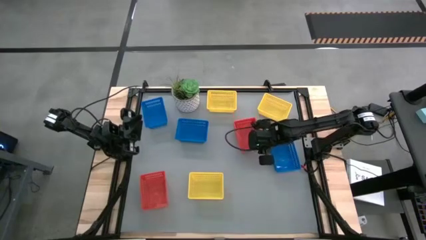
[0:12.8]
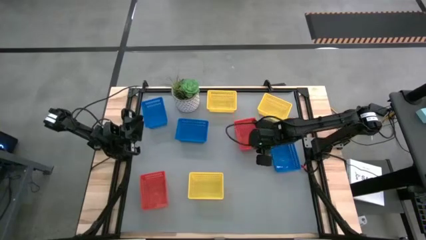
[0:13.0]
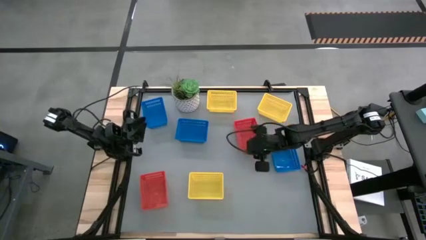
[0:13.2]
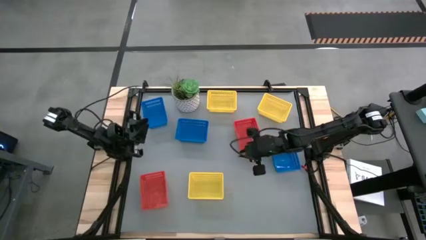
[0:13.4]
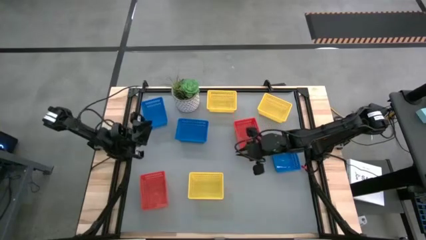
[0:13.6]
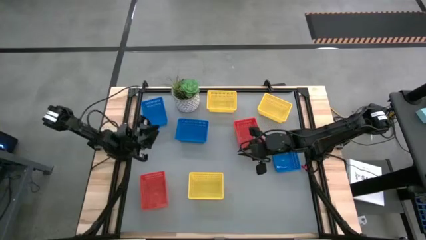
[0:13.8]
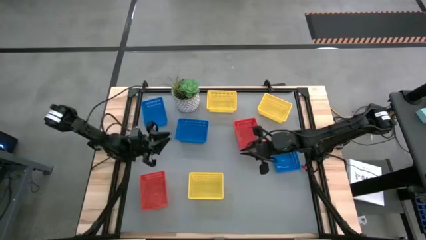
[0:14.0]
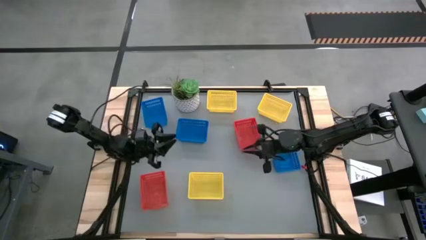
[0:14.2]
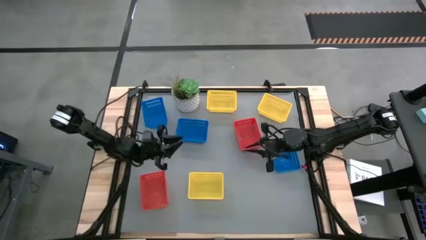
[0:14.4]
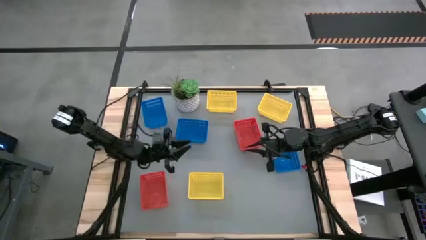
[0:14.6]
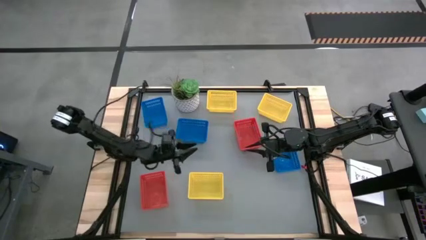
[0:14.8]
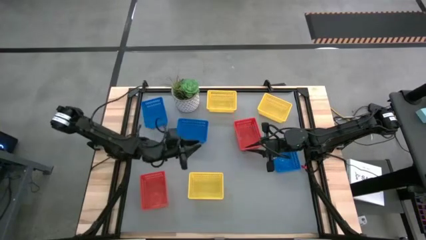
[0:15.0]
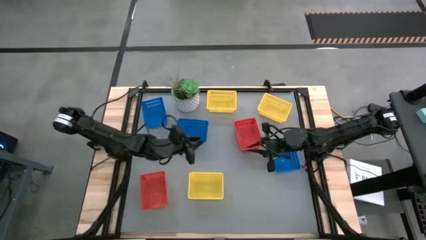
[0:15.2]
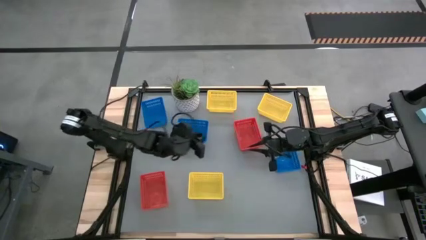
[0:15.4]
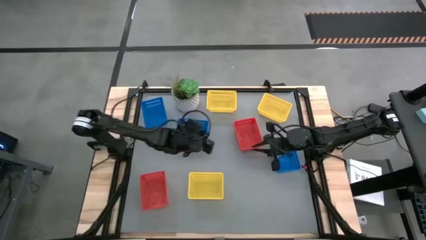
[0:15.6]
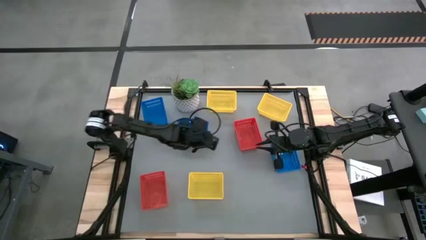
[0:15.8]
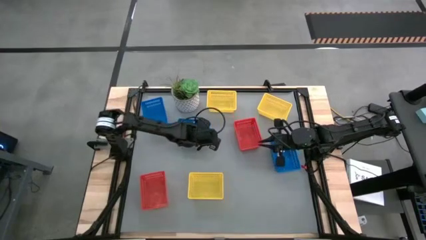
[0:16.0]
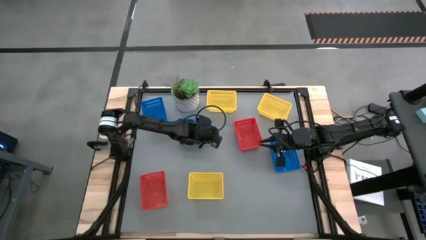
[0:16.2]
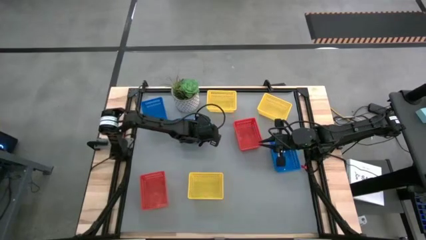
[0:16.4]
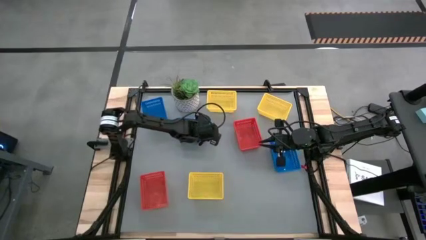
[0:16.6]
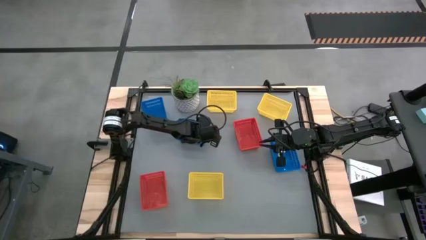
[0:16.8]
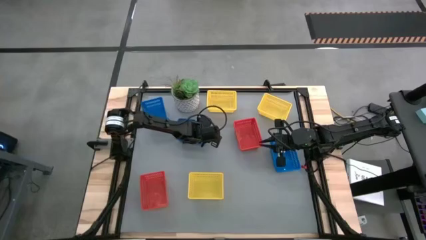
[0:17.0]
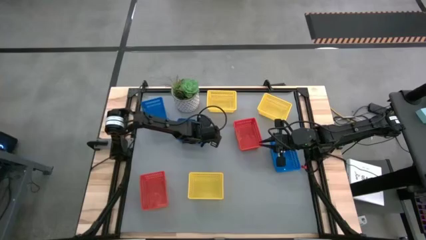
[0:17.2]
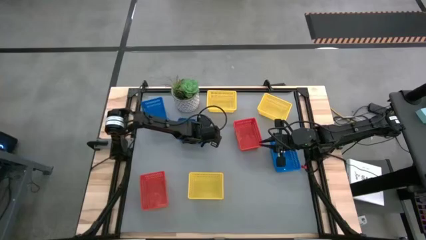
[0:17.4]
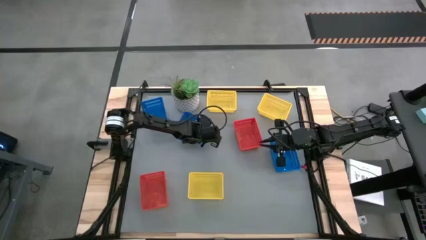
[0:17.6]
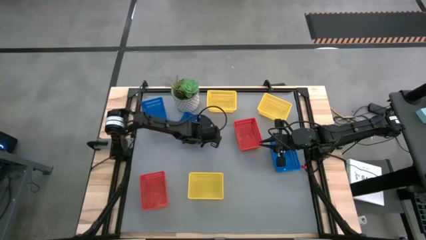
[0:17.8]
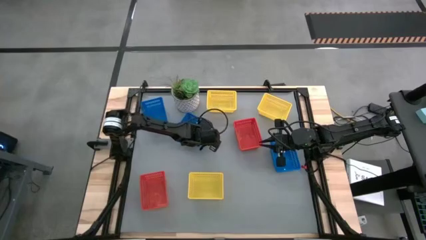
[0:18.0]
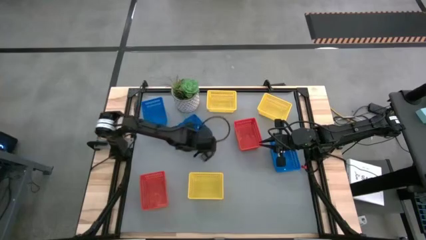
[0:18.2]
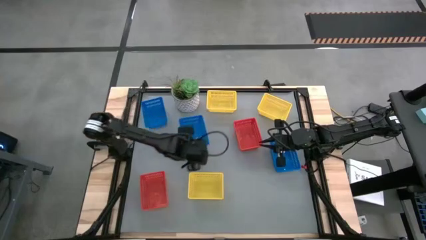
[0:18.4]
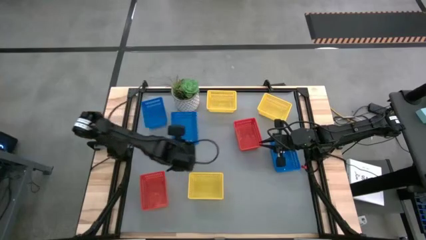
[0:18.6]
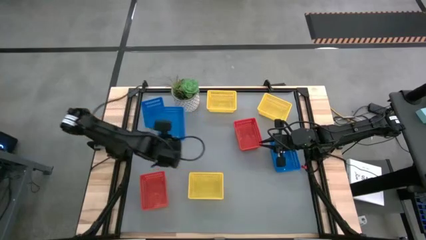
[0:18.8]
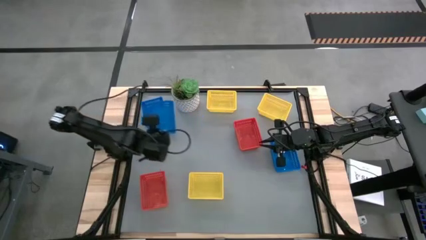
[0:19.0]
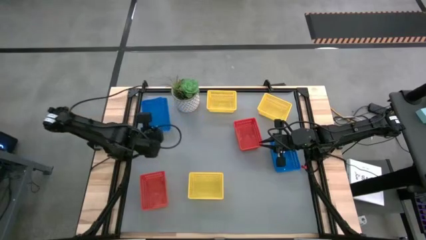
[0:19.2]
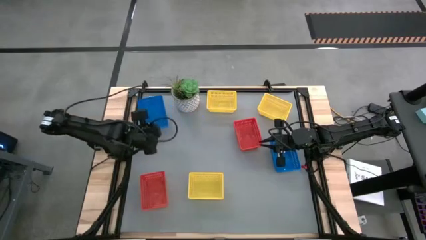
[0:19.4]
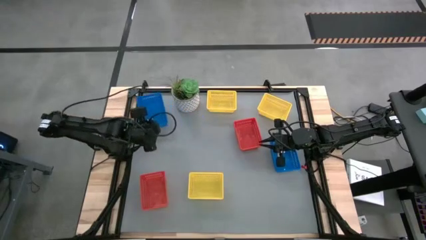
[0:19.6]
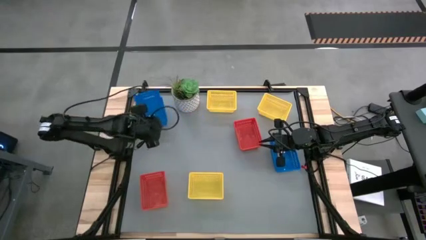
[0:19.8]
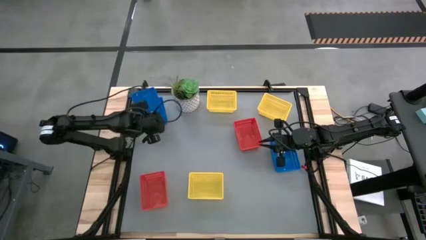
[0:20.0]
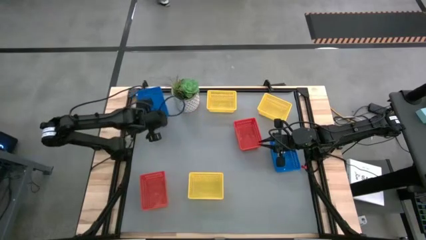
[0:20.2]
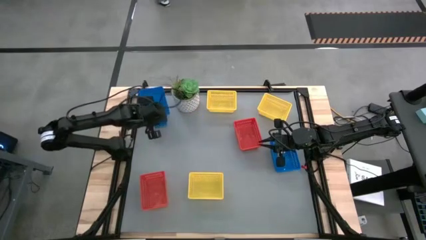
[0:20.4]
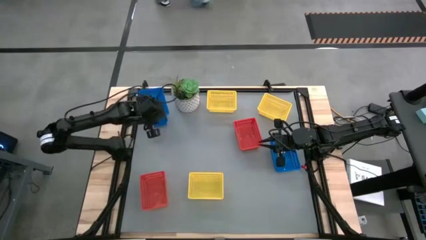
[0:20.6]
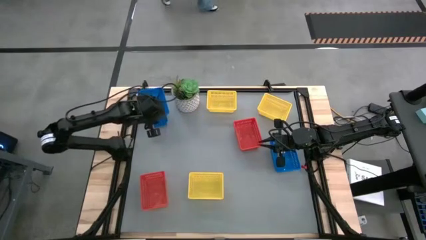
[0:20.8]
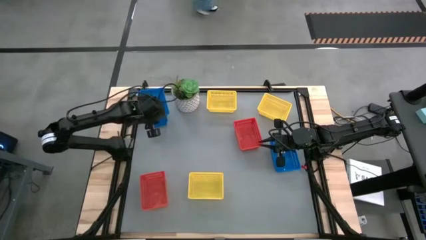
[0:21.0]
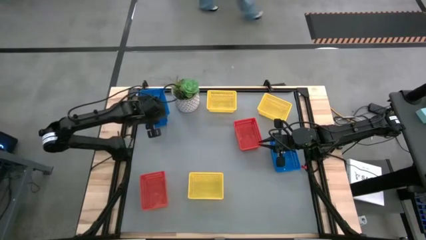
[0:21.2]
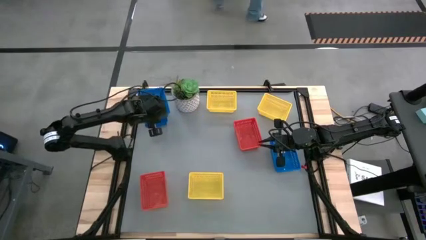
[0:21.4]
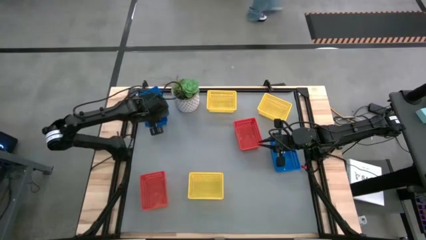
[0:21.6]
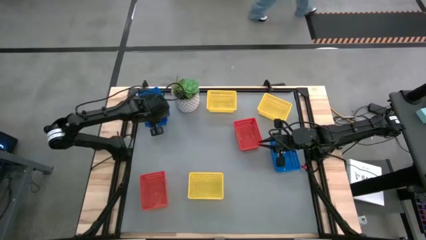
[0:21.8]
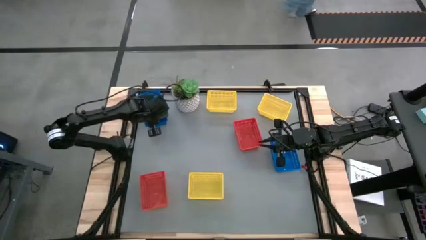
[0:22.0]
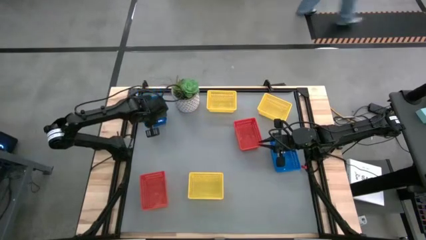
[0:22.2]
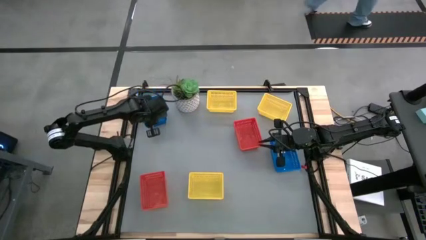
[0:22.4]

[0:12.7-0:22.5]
Stack the middle blue bin on top of the top blue bin
